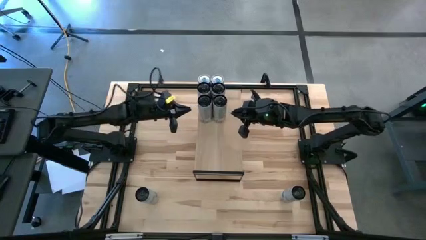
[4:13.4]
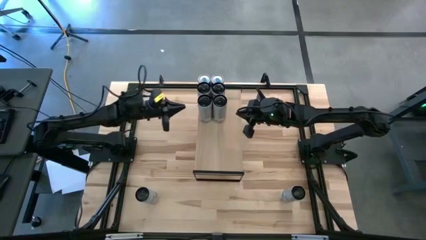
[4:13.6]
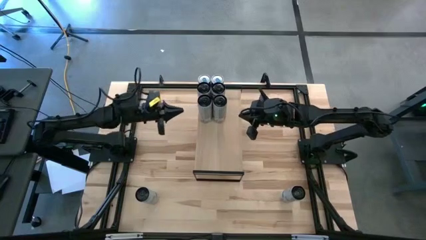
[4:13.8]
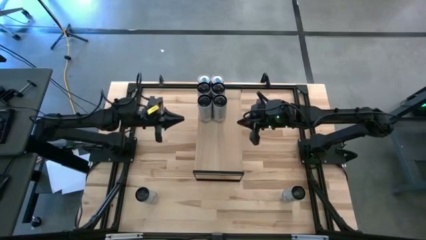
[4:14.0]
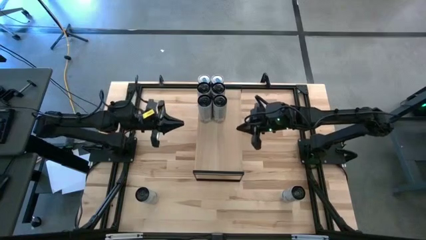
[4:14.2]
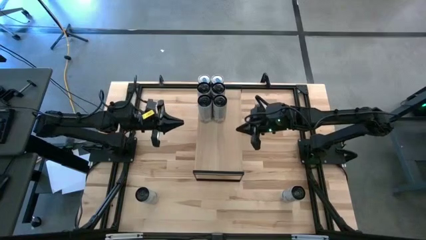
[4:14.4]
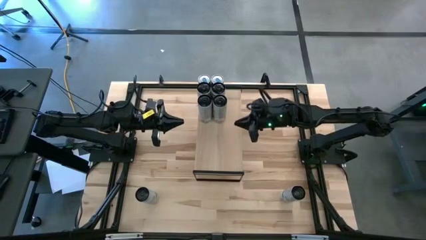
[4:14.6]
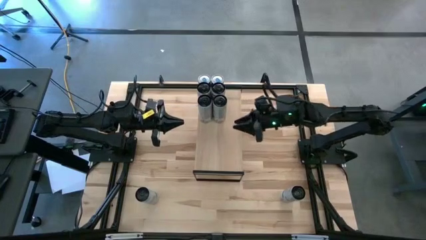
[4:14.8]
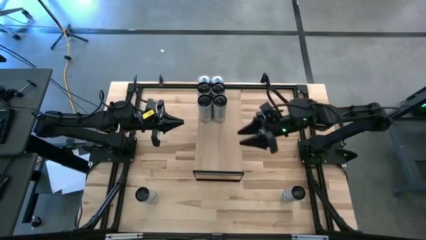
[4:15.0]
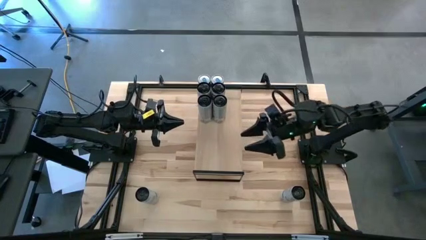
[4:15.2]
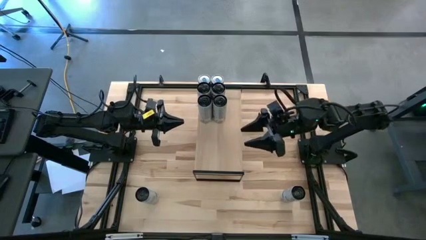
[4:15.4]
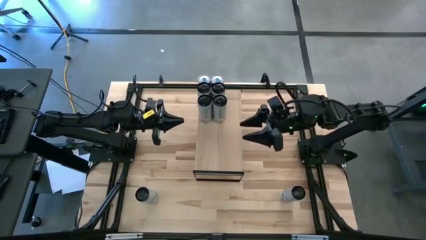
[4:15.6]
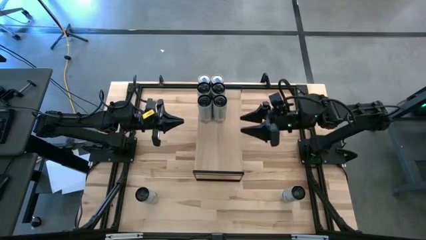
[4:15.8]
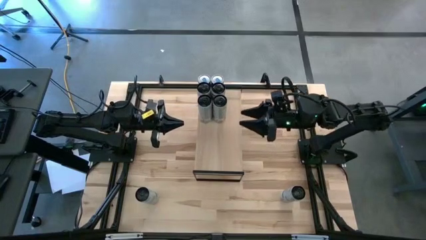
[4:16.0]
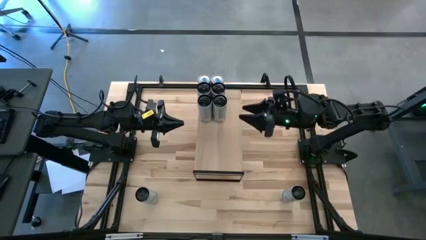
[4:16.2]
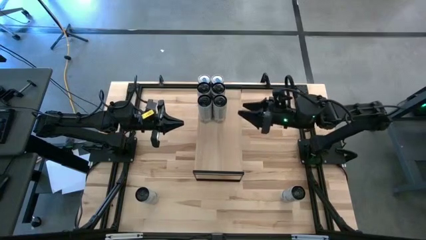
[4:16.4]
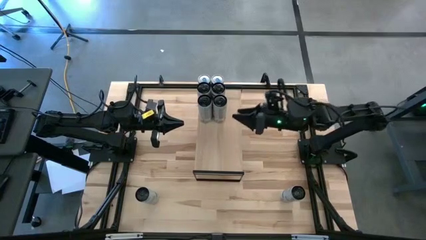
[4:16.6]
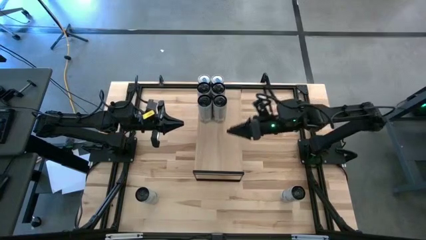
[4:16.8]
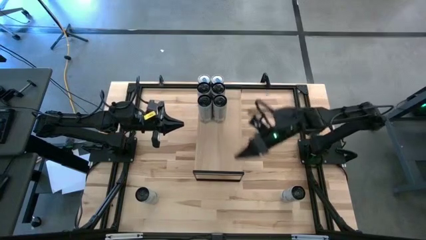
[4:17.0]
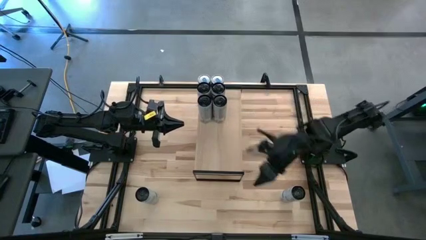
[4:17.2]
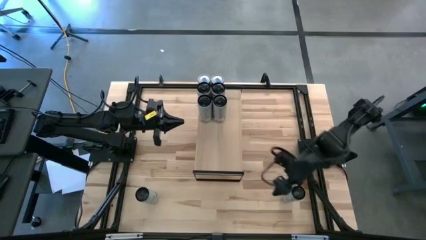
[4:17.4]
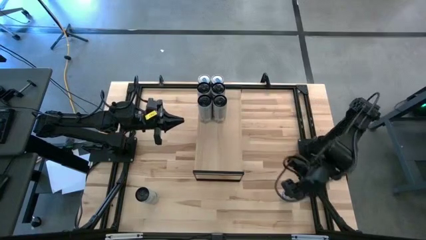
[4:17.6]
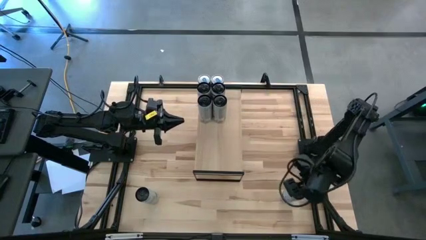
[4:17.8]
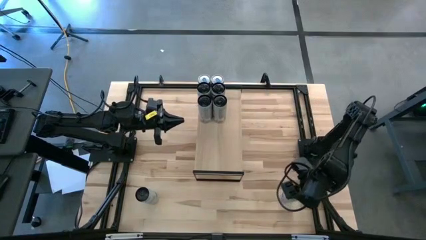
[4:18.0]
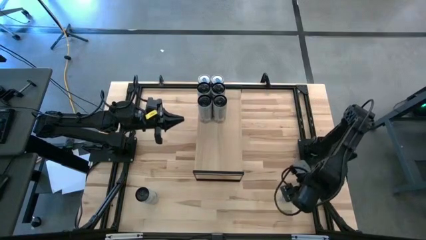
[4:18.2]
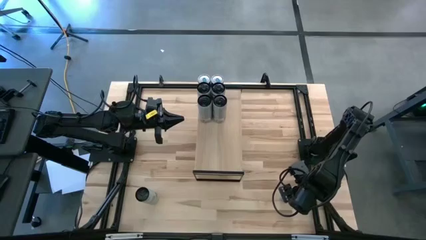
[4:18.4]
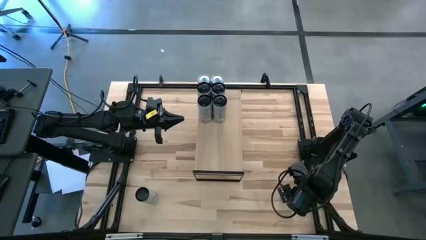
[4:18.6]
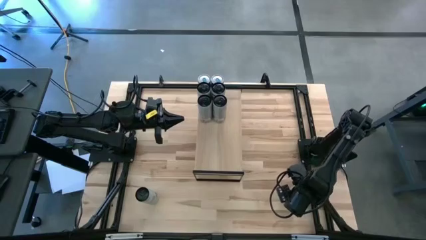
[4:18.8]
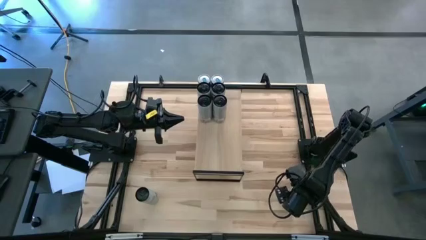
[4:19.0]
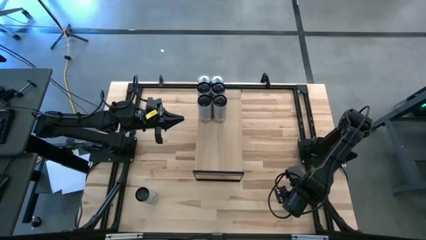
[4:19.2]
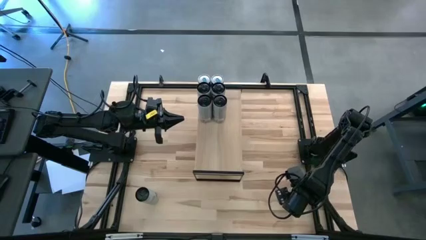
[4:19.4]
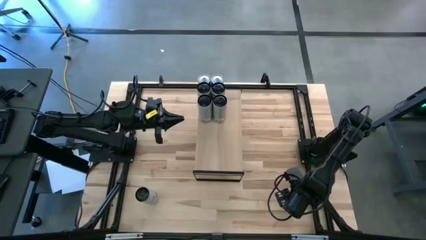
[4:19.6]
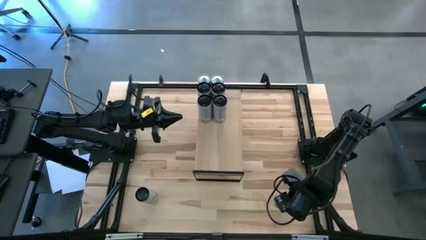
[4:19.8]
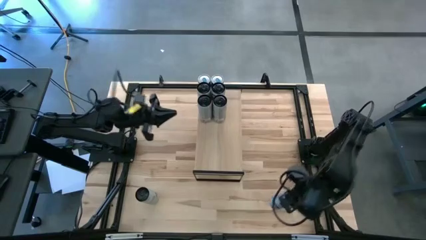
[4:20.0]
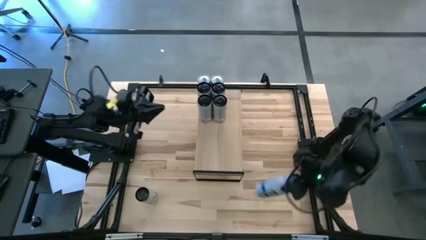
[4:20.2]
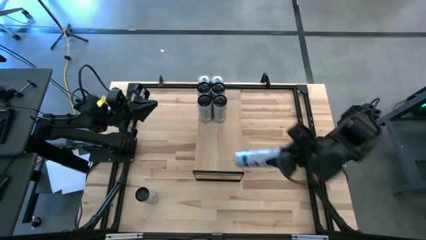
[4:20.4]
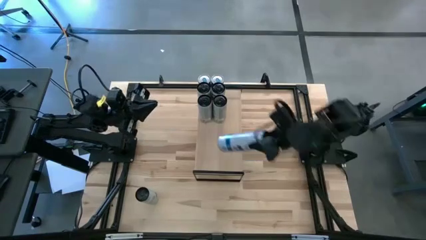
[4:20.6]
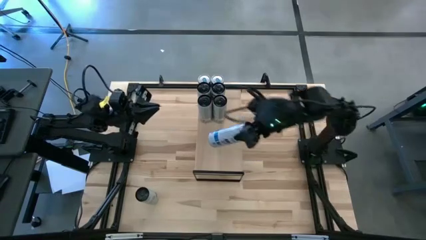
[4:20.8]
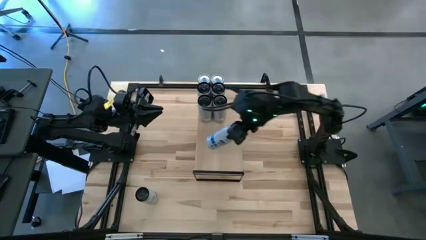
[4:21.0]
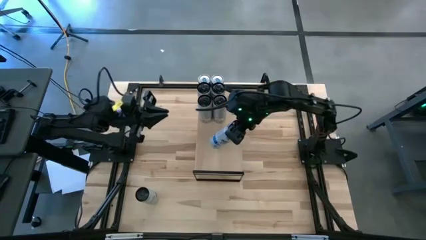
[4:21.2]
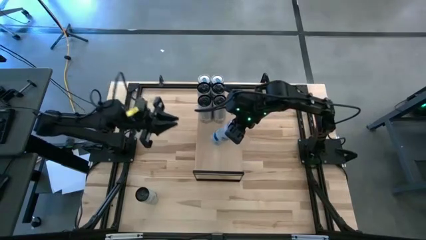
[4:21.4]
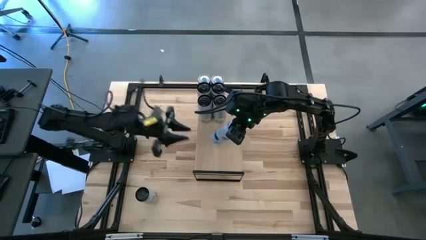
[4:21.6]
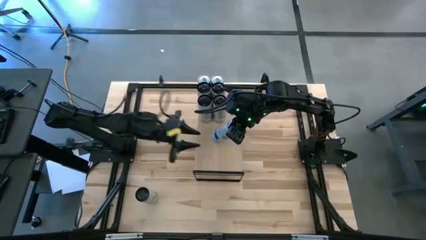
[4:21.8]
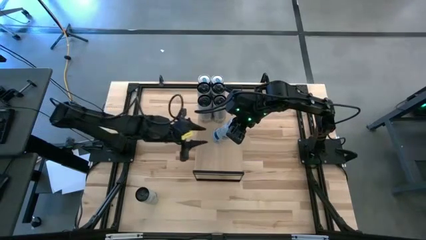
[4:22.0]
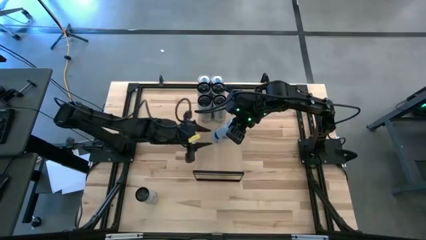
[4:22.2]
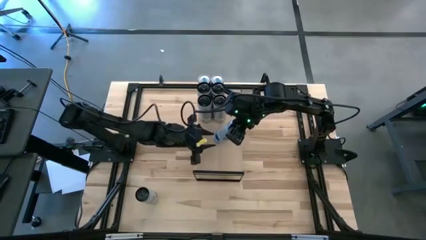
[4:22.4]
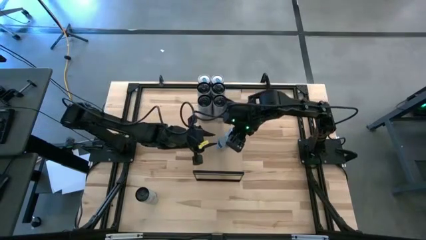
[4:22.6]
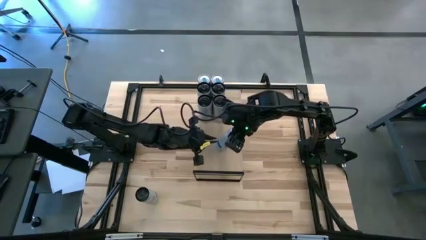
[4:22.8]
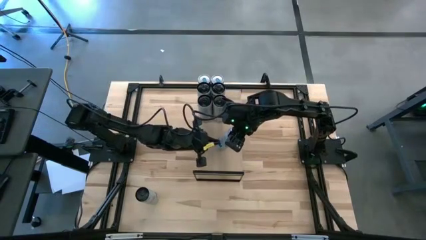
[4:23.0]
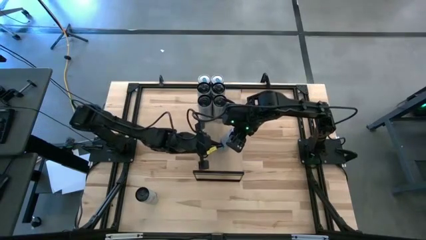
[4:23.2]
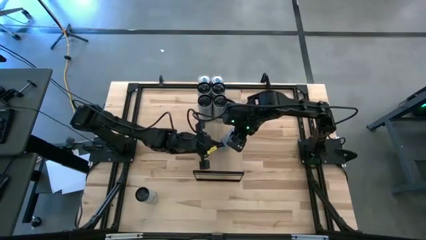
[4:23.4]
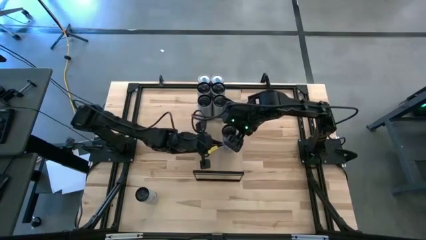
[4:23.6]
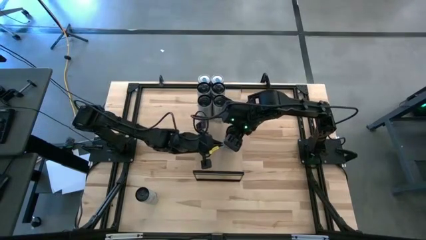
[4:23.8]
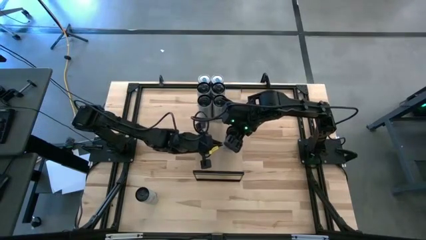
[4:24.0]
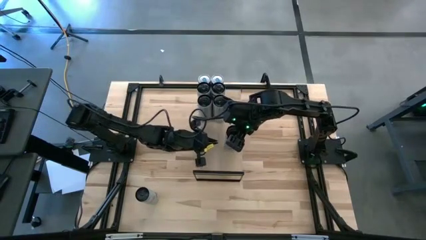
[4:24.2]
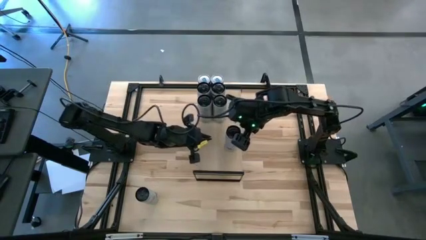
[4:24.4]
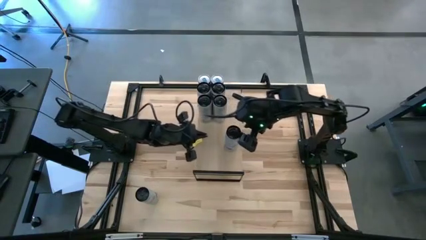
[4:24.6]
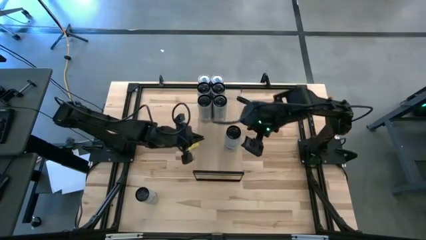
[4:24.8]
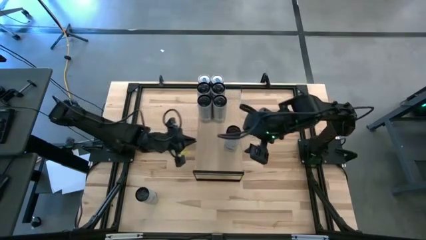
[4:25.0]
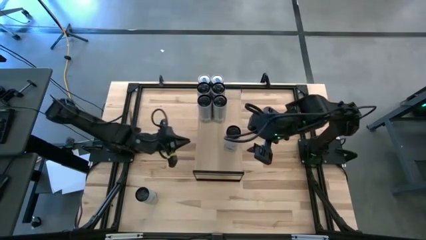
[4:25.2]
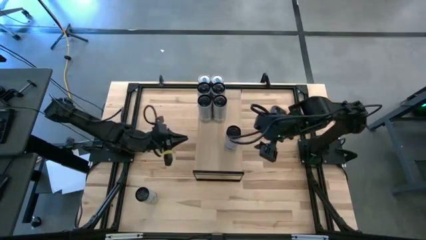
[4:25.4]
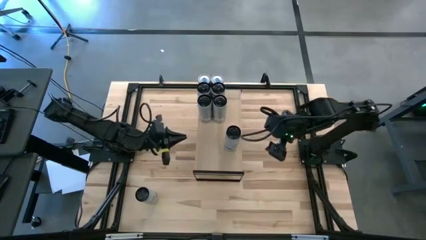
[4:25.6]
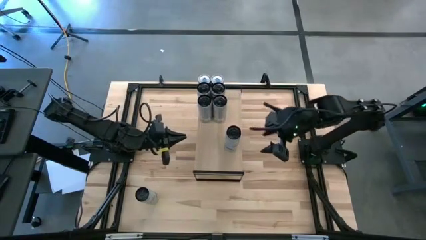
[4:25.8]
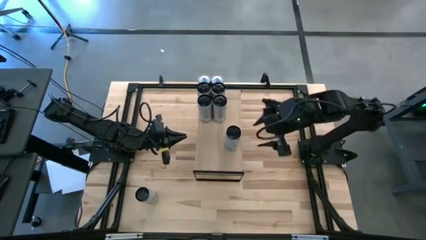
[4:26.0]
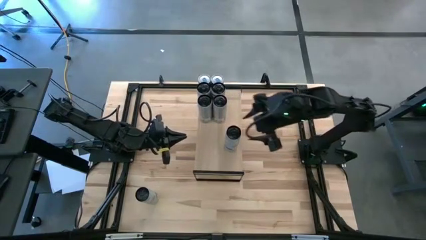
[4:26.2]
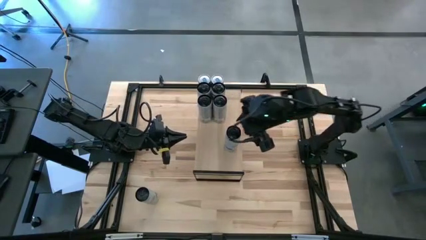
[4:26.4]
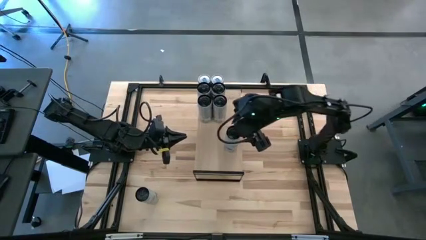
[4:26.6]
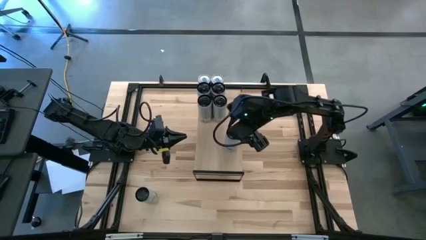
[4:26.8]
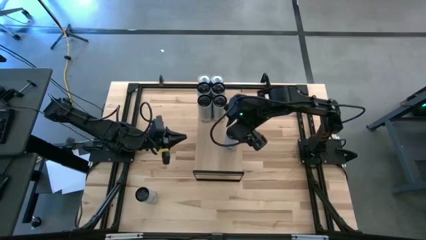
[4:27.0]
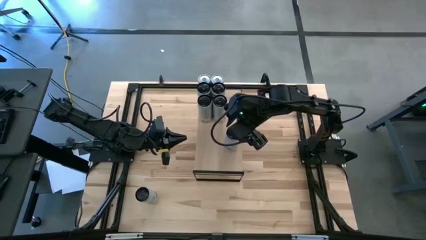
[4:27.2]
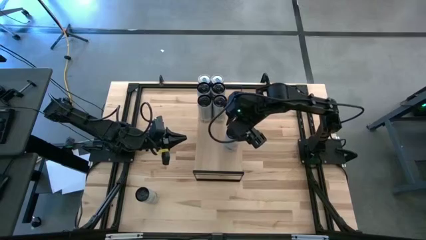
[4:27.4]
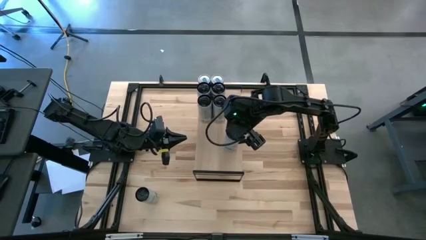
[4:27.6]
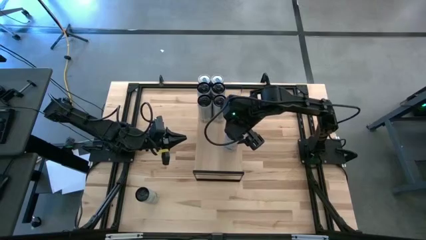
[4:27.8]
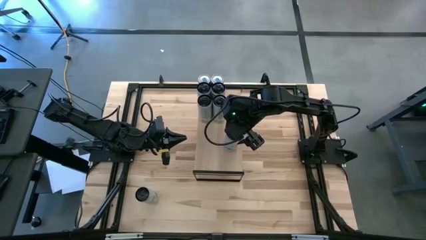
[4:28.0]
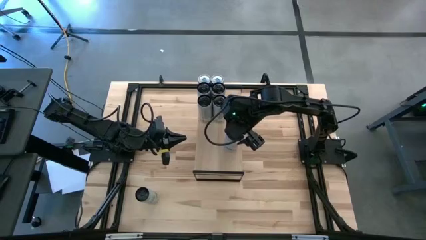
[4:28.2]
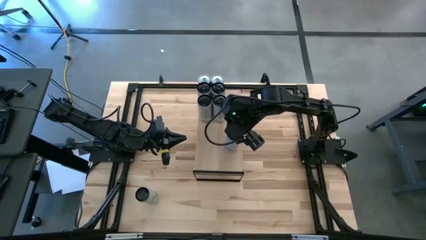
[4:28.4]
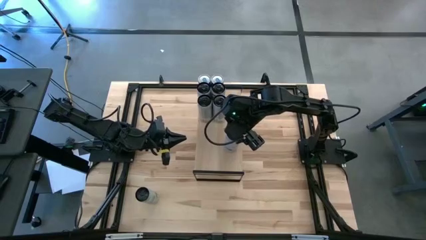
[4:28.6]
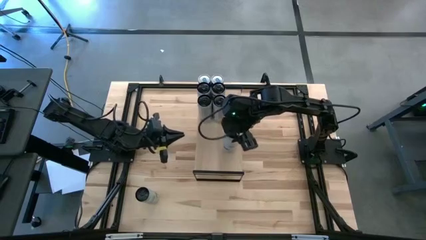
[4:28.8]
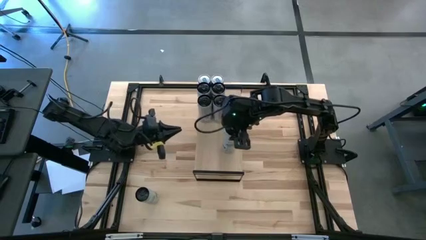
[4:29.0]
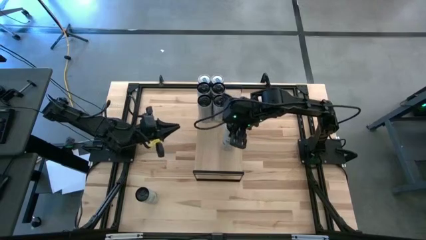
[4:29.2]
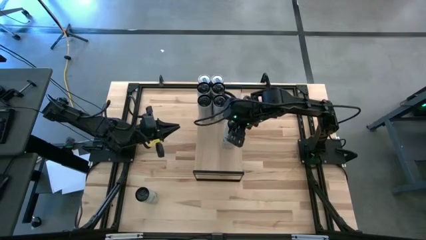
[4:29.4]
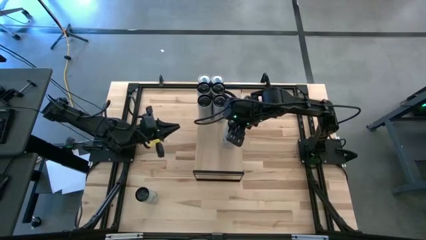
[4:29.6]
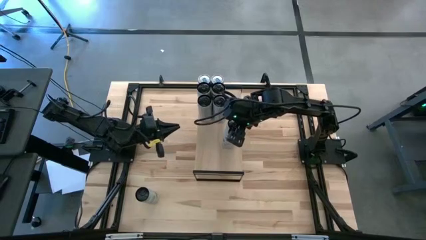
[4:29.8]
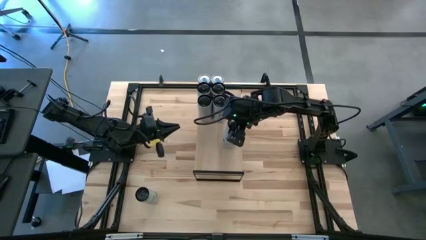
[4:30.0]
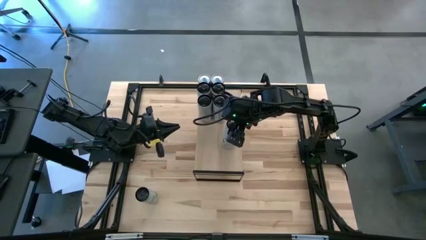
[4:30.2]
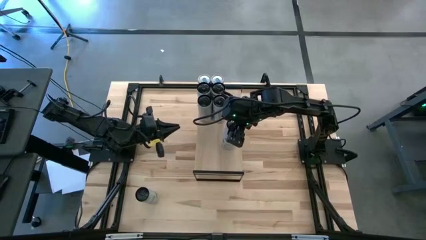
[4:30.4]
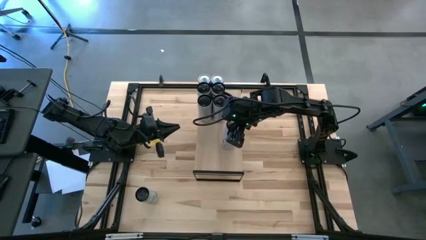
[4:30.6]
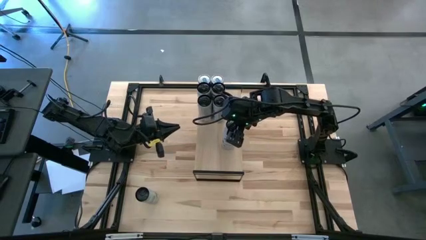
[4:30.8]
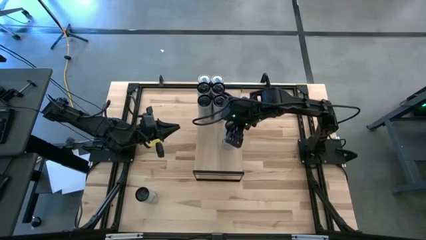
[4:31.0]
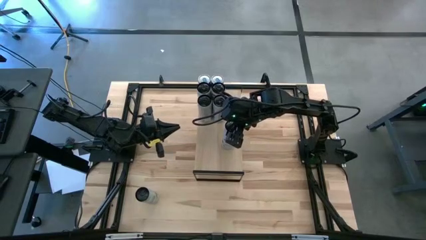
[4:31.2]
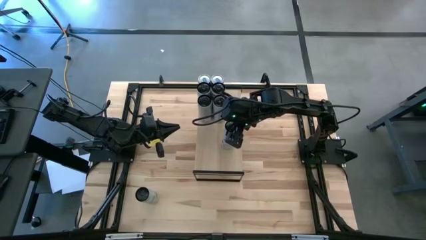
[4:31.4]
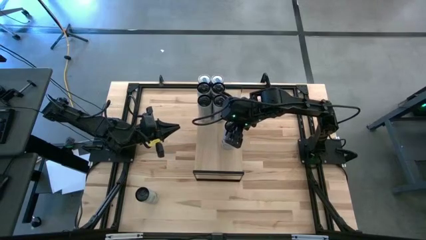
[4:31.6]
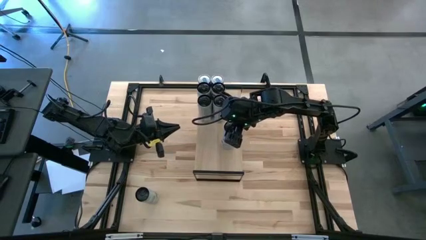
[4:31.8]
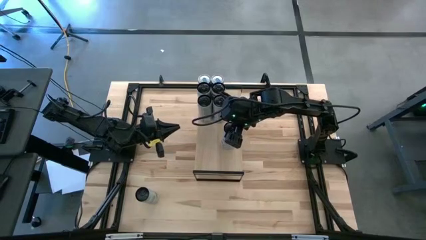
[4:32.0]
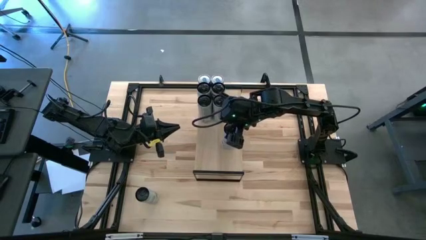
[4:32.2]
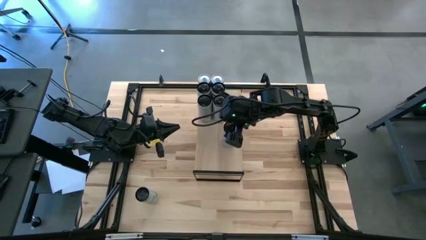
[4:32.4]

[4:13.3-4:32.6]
Task: Place canned beverage on shelf
Put the right white blue soda can on the shelf
